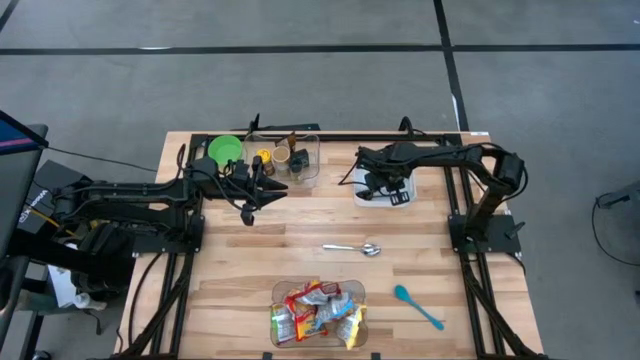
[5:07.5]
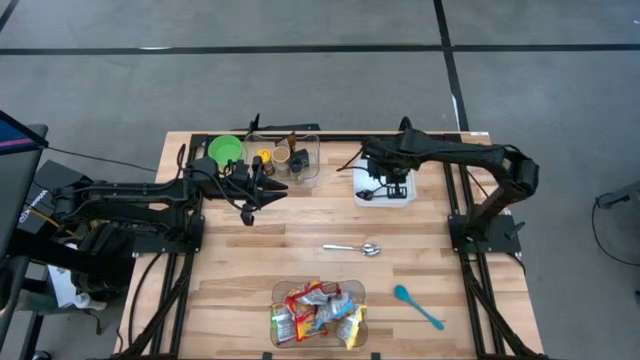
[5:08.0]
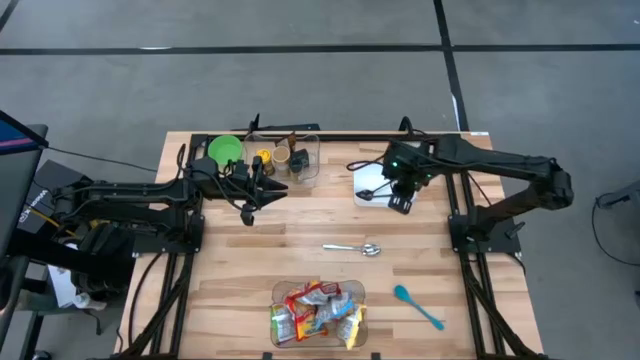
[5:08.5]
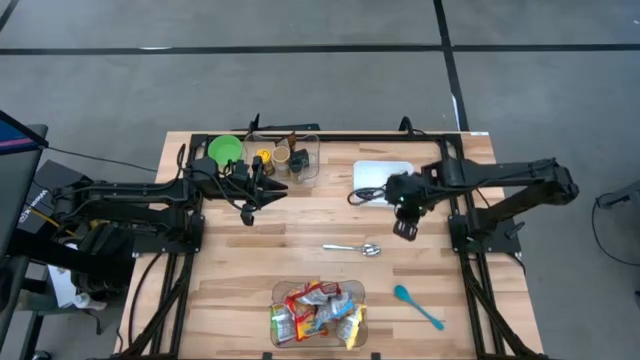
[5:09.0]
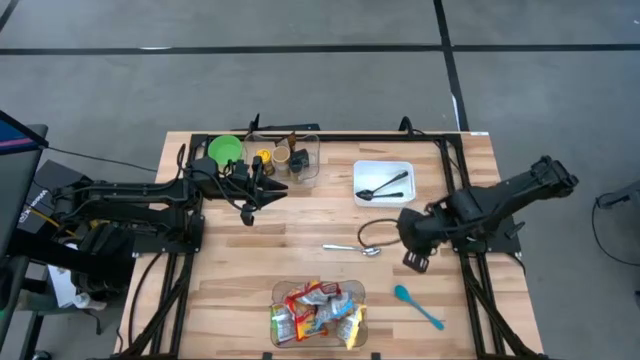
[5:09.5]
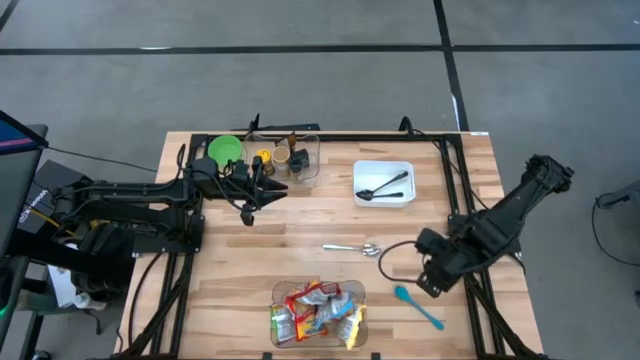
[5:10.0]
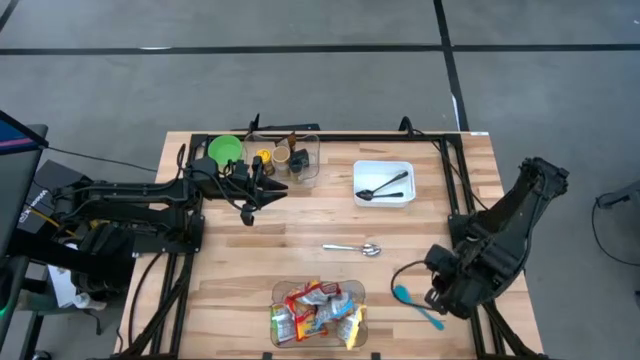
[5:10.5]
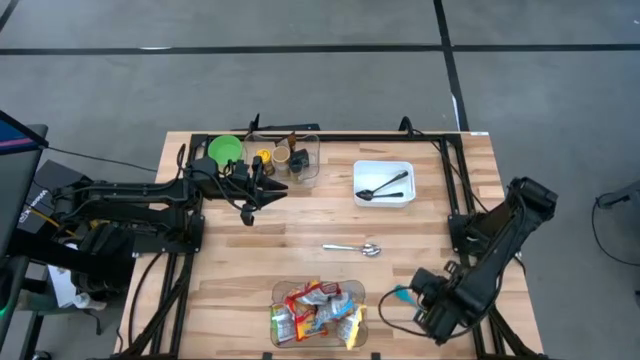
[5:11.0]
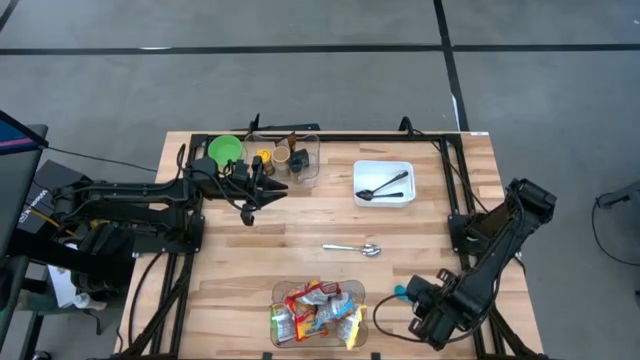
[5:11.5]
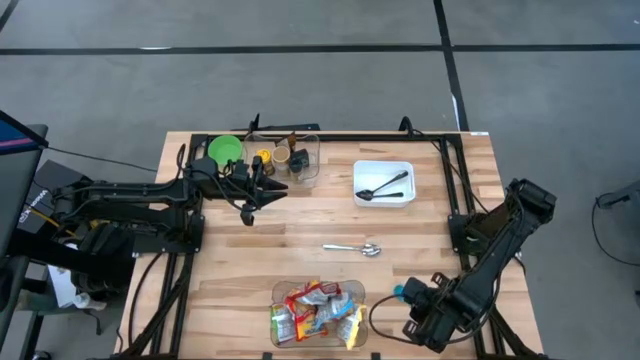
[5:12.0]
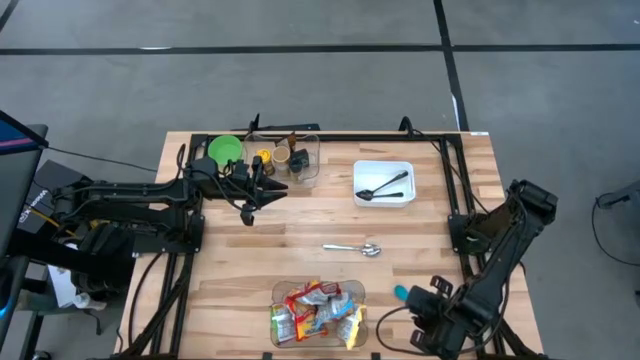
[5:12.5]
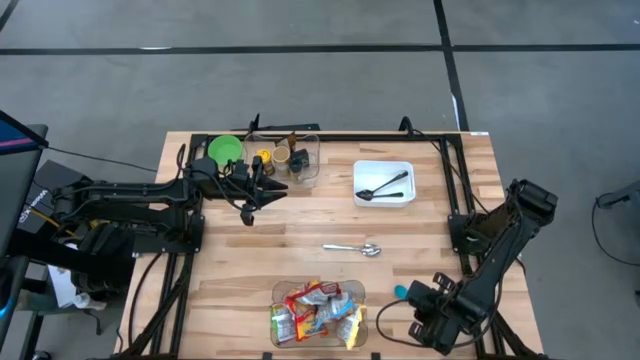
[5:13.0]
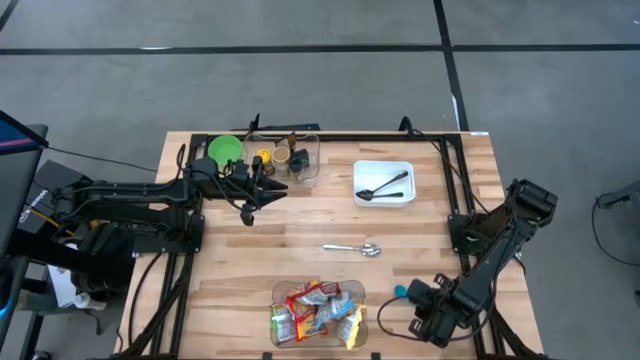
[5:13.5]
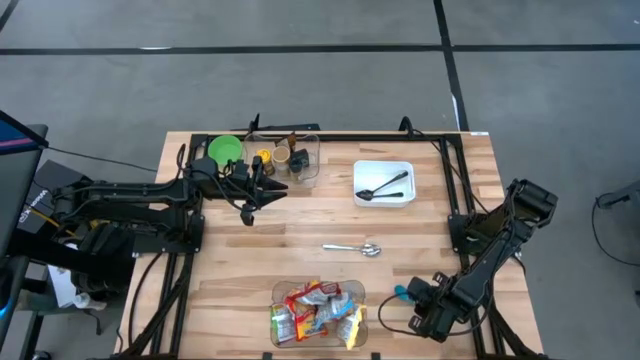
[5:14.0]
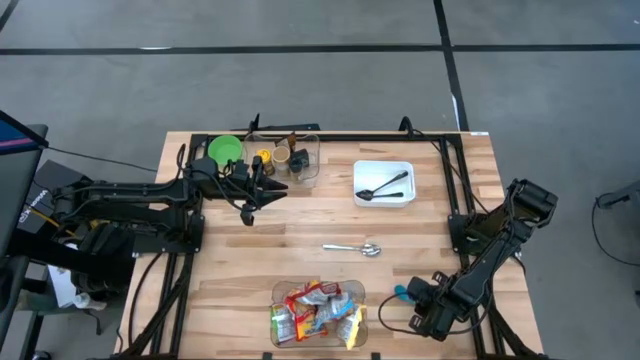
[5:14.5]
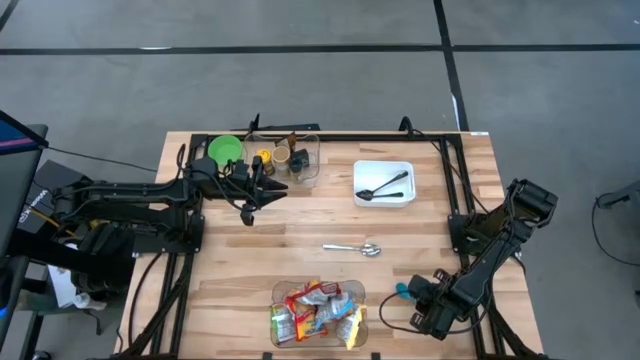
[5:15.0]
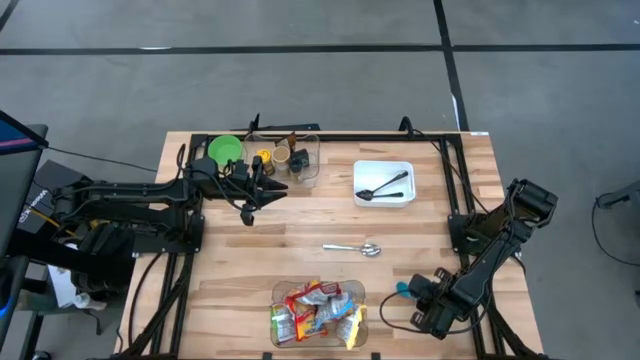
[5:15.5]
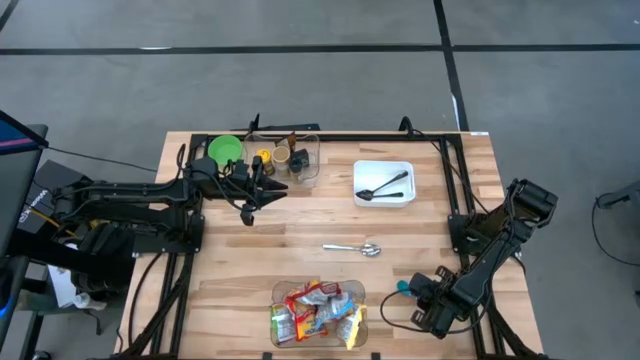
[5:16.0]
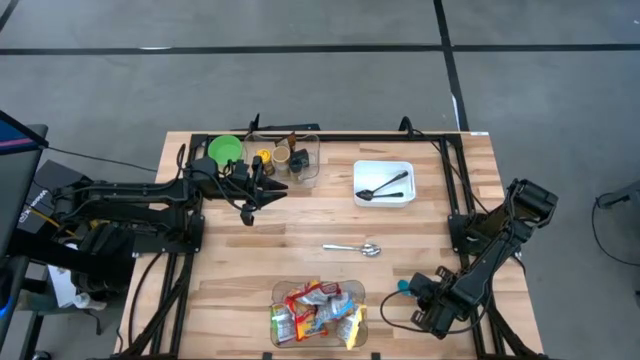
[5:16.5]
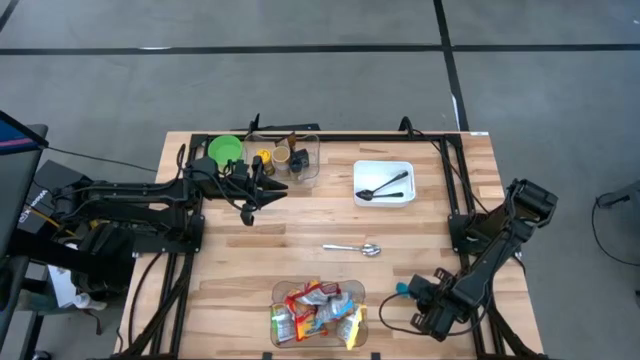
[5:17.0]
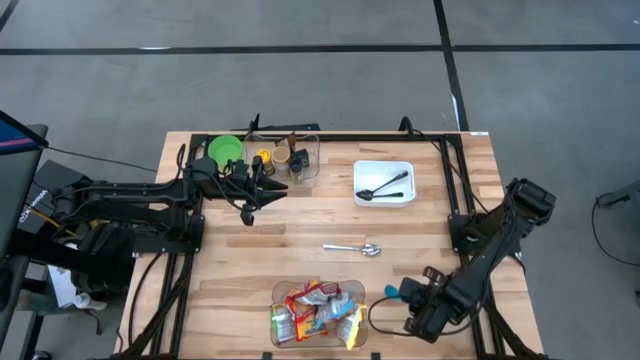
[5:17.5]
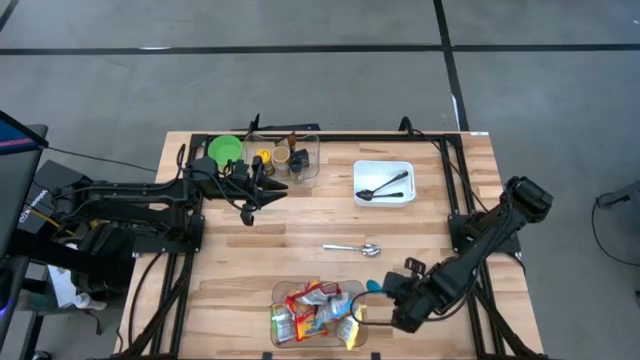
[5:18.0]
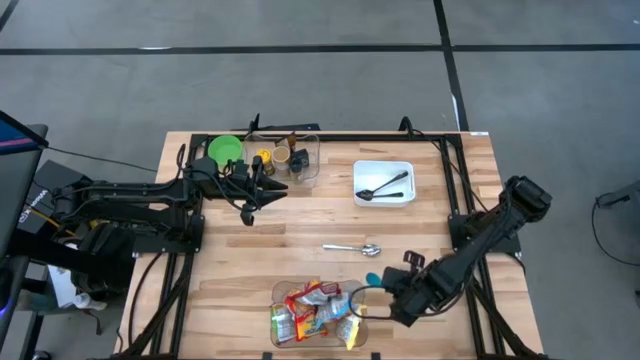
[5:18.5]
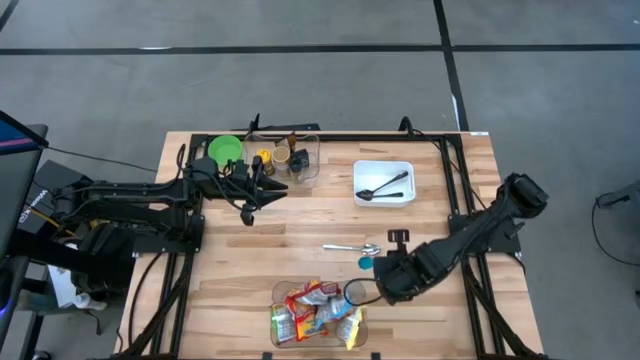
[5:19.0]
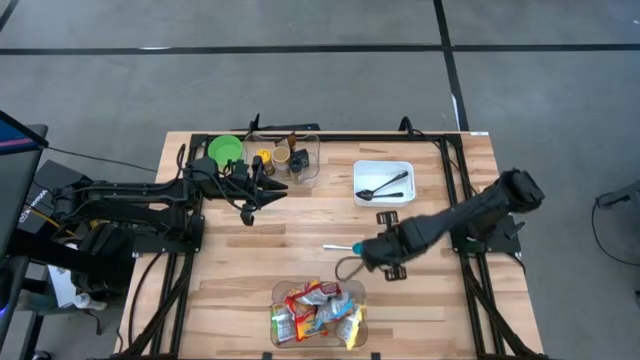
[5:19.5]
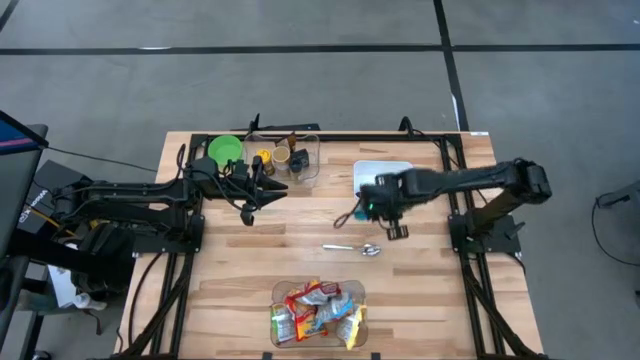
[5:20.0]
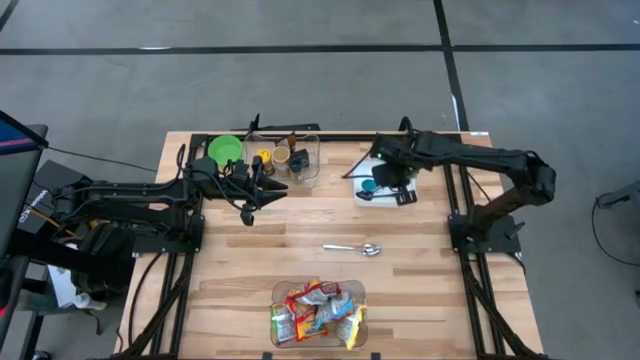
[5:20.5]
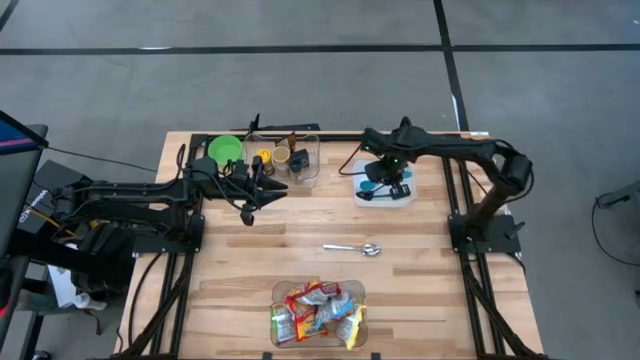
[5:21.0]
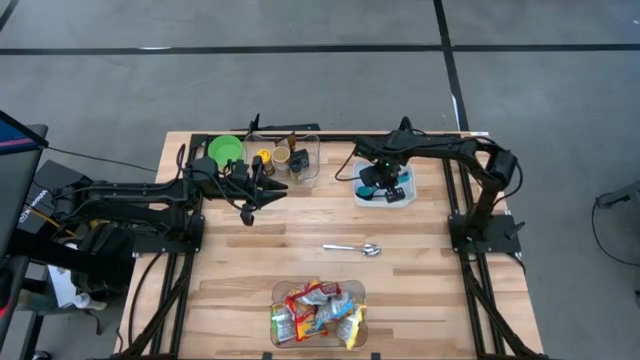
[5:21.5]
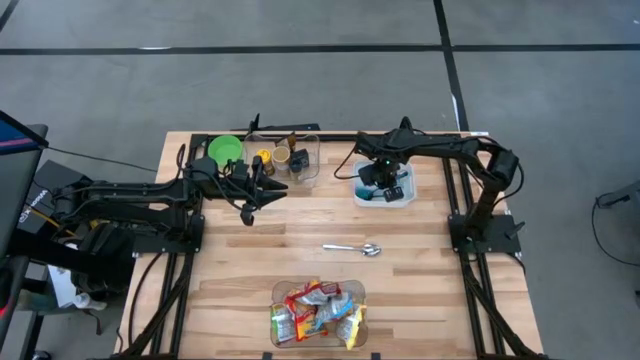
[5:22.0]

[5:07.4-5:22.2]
Task: Pick & Place Food Item
Put the blue baby spoon into the white bin

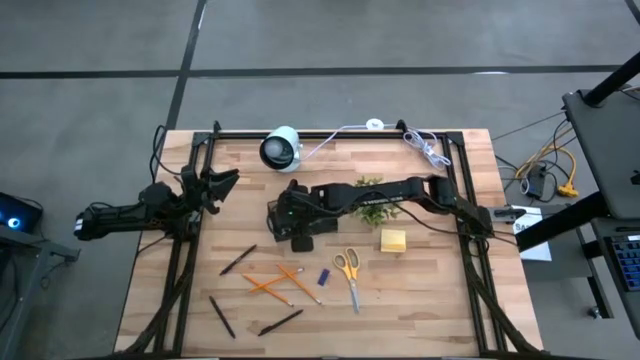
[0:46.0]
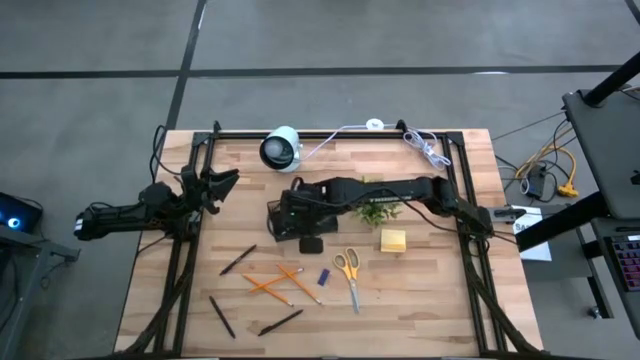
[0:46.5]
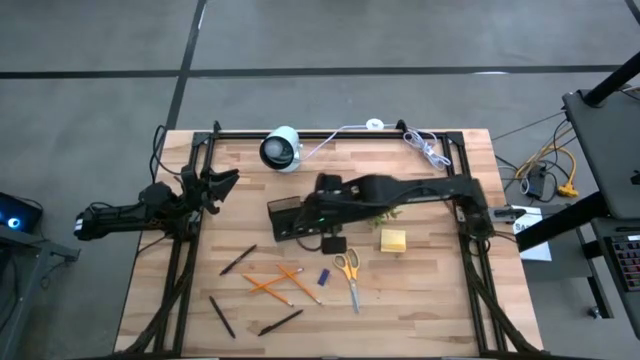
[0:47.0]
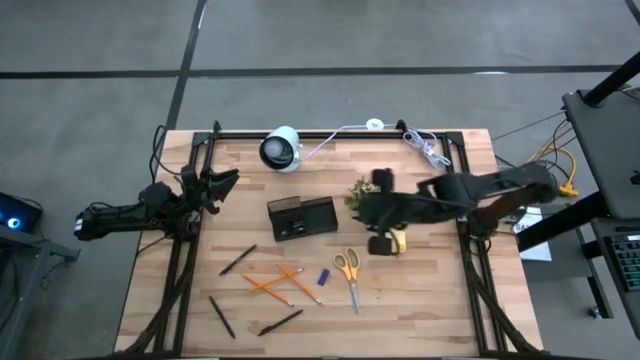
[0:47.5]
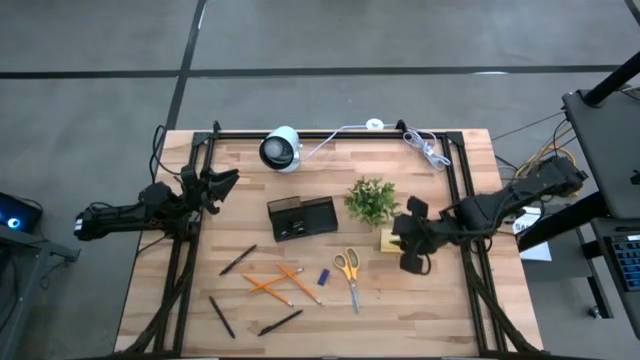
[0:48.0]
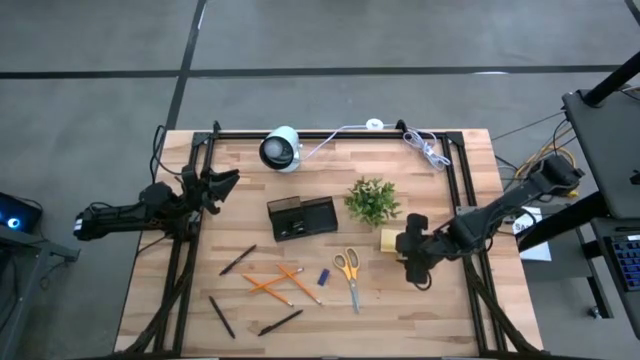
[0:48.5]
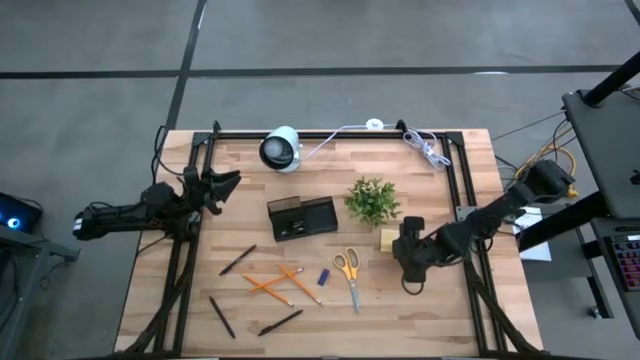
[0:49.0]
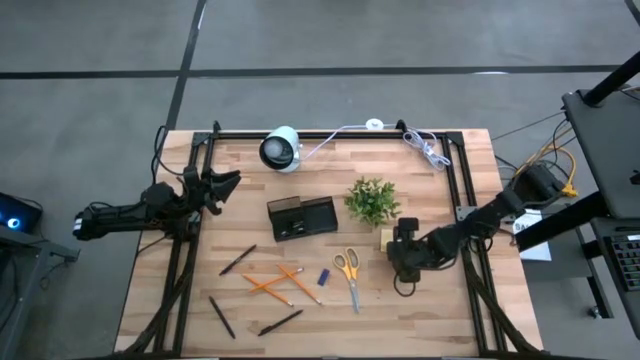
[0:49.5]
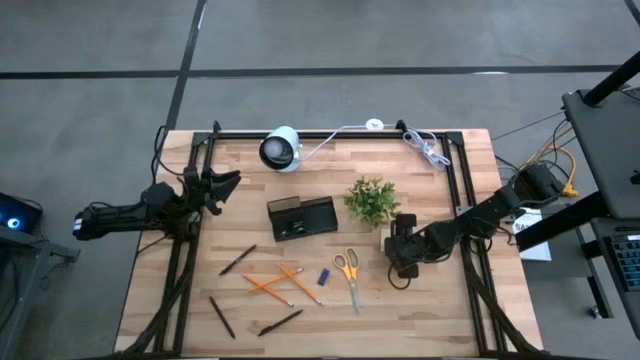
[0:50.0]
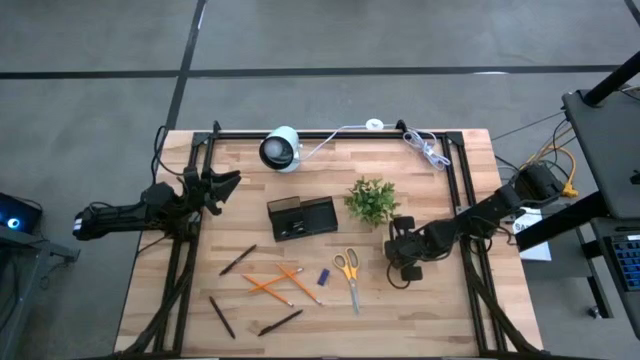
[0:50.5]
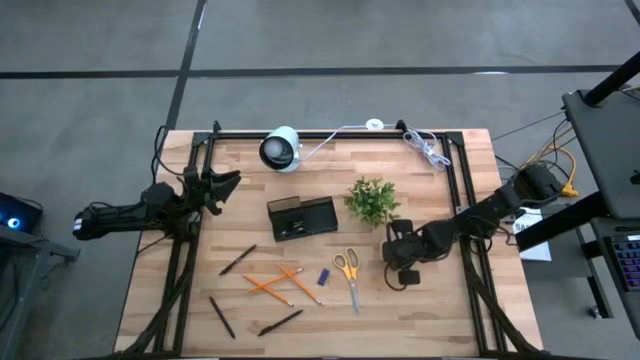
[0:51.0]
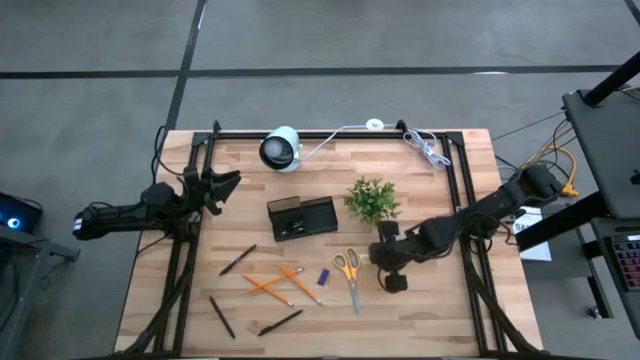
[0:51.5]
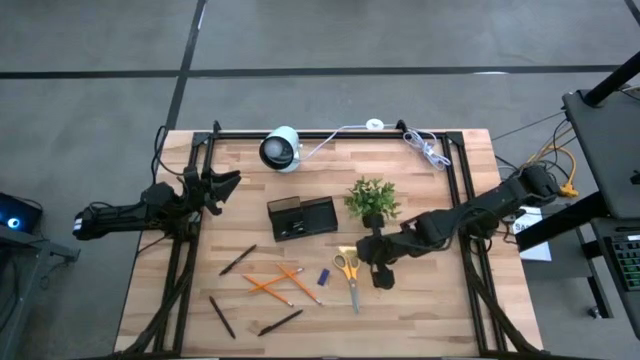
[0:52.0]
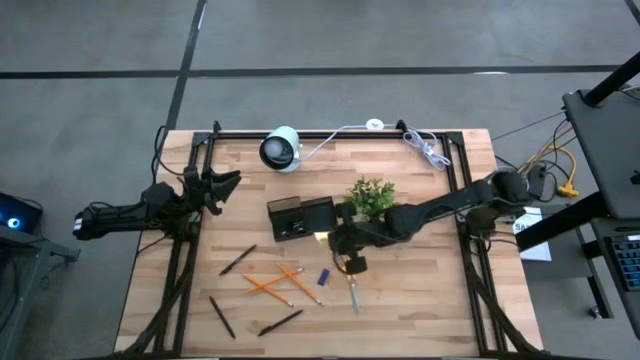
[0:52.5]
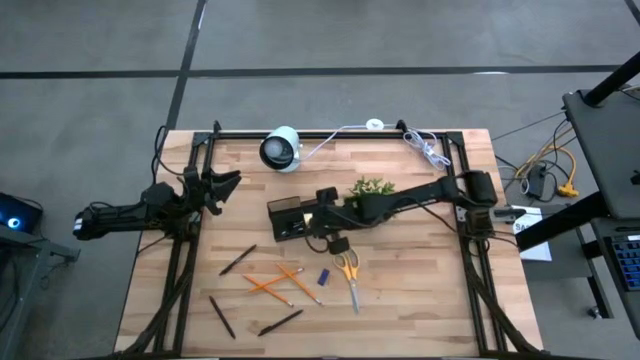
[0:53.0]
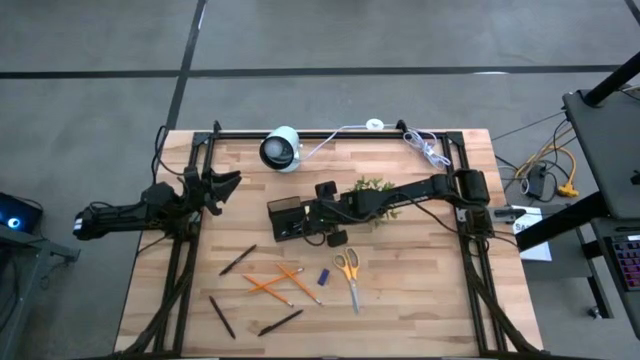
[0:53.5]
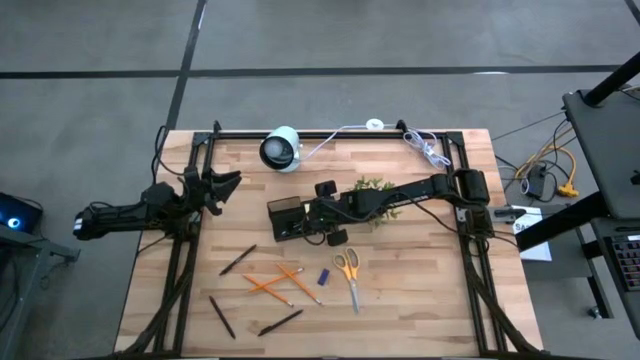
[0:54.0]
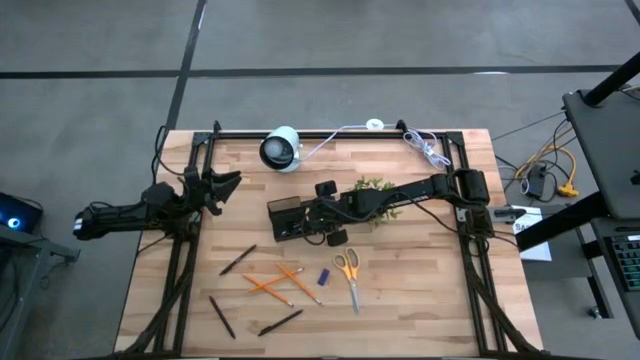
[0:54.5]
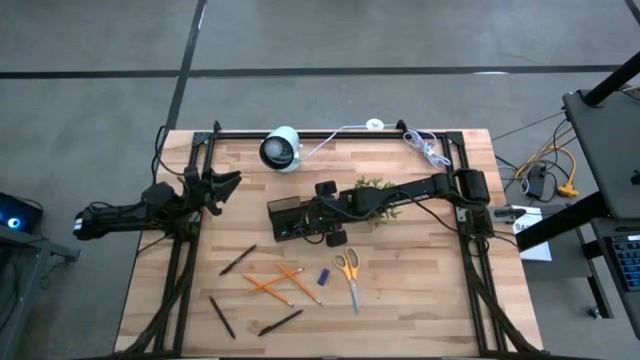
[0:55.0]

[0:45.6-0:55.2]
Task: Pick and place office supplies into organizer
Put the yellow sticky notes in the black desk organizer
